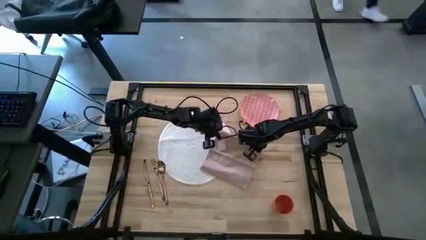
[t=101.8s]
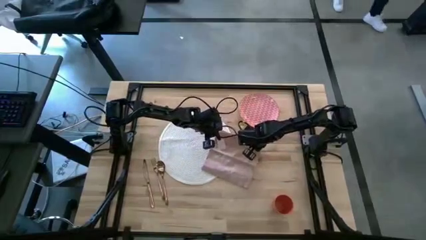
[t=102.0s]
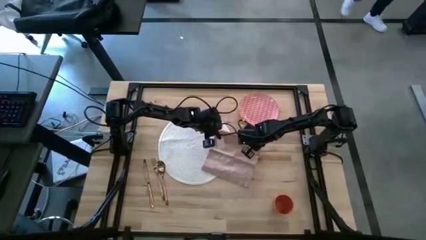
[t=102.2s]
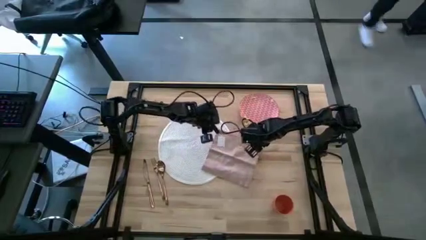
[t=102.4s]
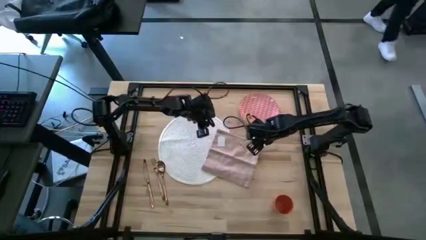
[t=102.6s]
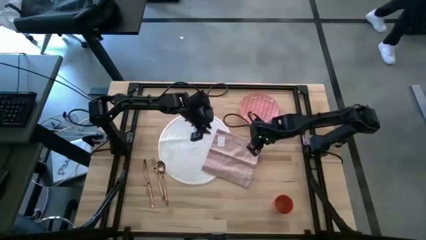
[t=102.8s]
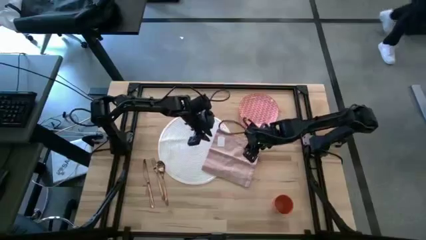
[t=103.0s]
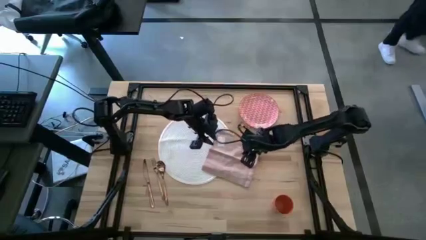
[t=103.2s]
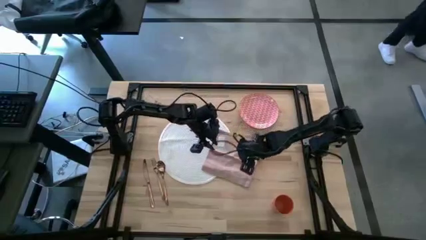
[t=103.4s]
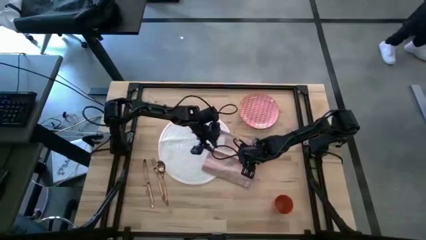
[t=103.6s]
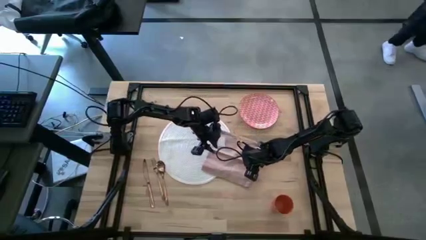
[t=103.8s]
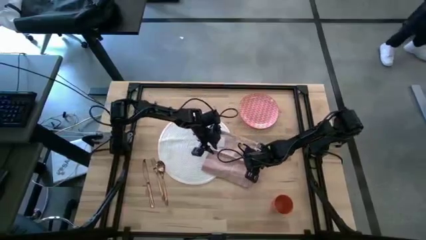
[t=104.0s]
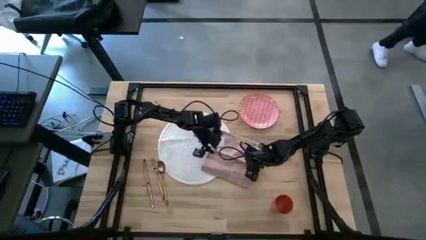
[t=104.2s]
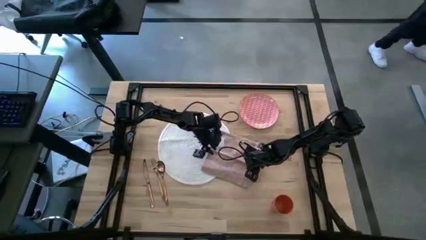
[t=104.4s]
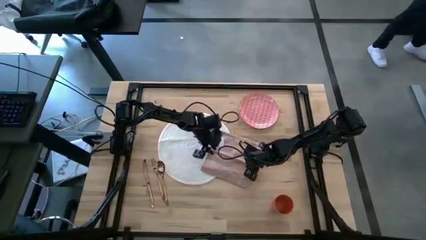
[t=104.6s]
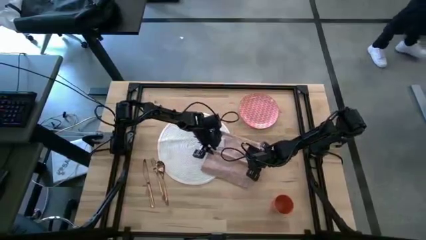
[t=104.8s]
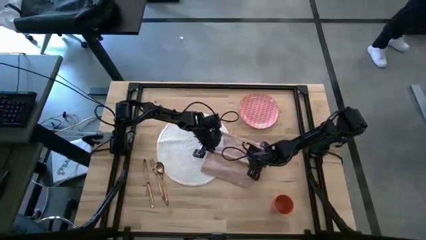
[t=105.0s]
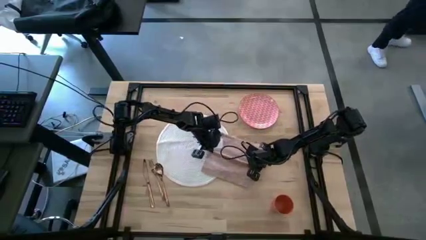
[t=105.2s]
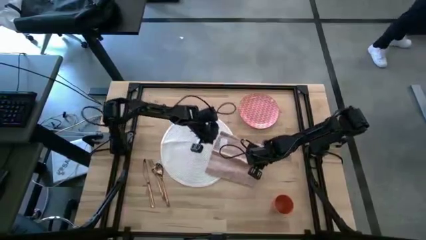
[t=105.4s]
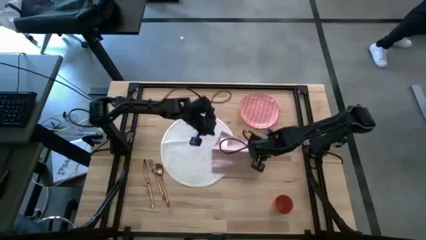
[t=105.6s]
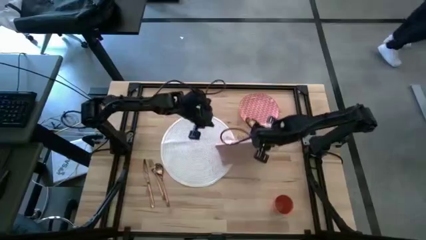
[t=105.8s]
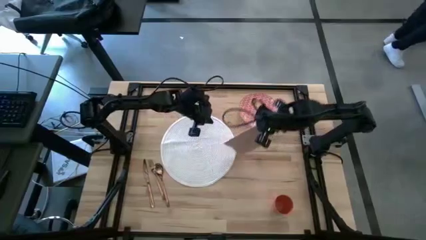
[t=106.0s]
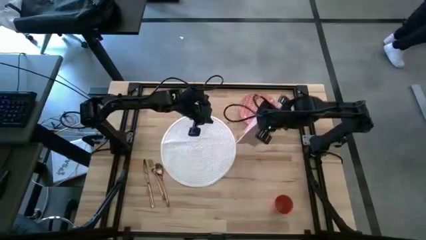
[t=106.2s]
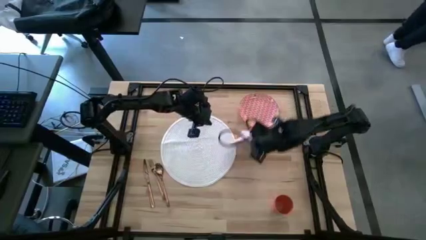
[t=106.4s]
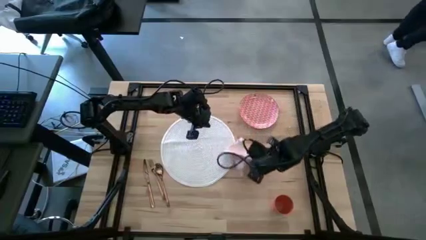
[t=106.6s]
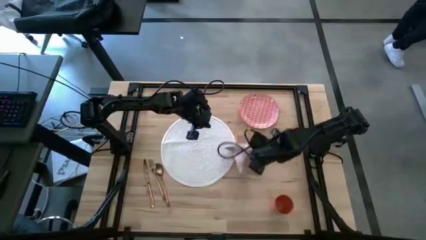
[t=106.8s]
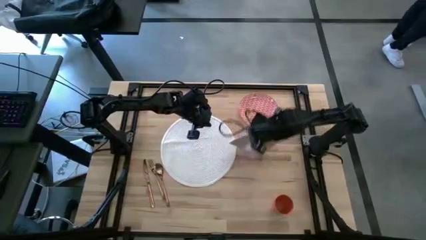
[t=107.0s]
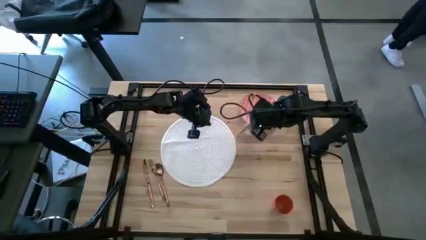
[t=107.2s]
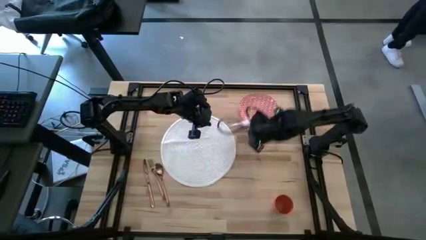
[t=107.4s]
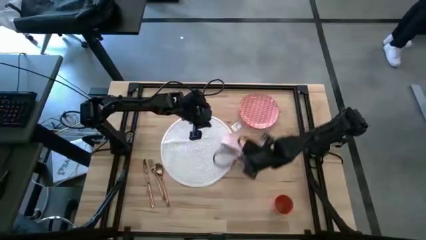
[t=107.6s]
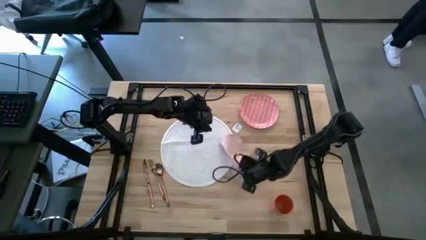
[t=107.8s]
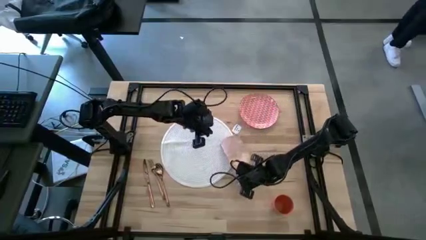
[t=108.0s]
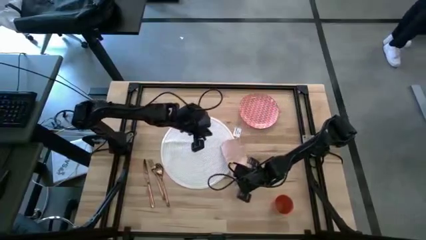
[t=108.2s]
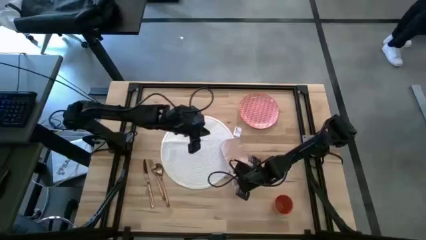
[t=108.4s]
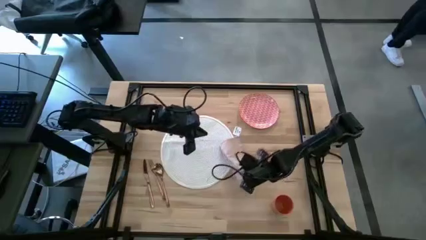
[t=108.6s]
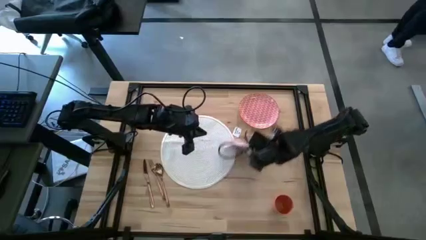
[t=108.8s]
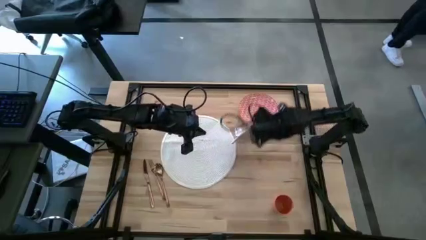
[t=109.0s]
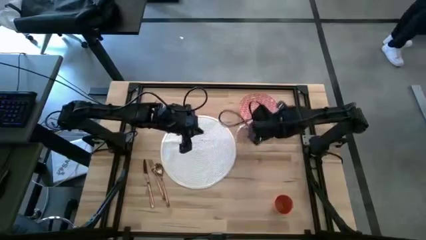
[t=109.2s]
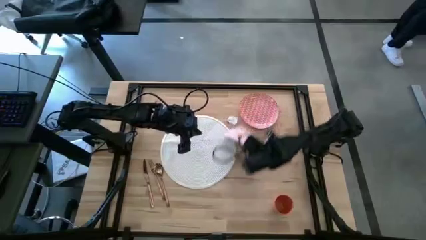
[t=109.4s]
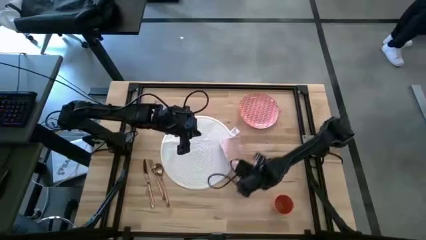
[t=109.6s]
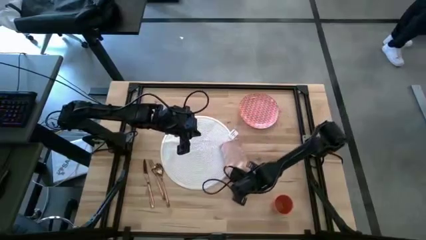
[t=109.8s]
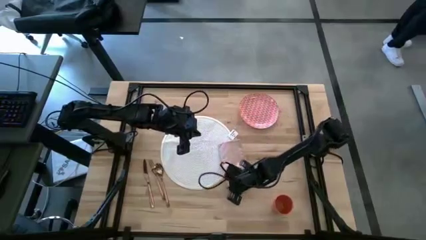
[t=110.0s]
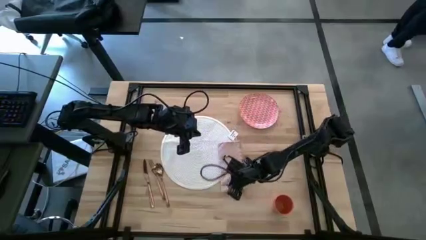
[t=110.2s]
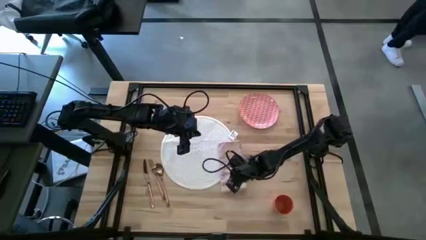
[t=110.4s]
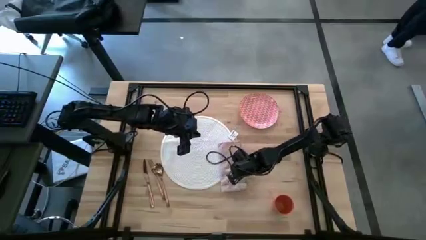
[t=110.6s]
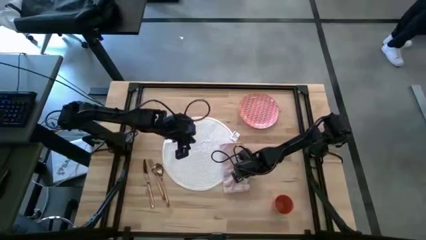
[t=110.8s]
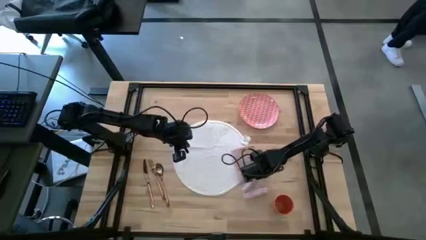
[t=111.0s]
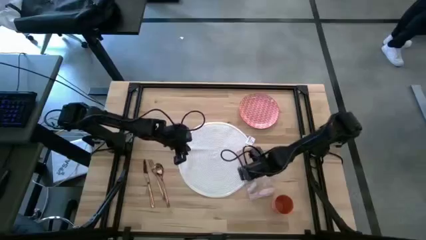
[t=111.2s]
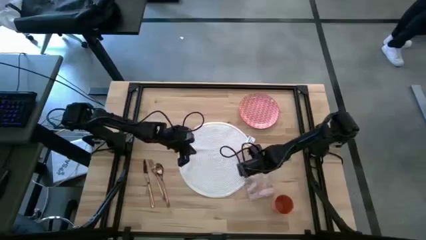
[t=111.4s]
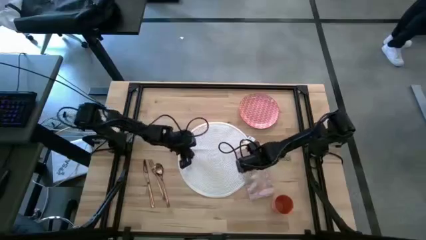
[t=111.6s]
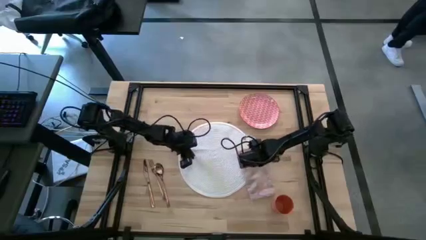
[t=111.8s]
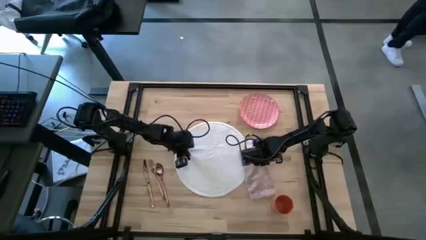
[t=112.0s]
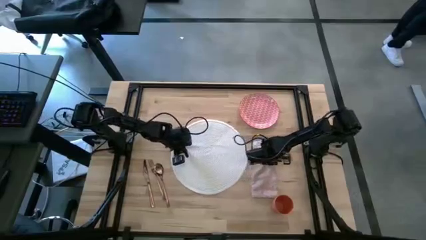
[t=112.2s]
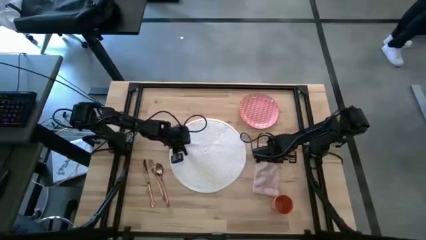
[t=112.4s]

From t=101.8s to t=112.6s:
Task: Set table place
Fold the pink napkin

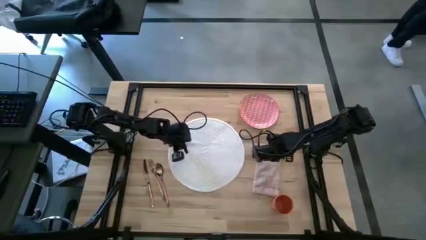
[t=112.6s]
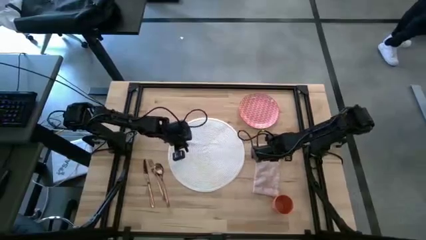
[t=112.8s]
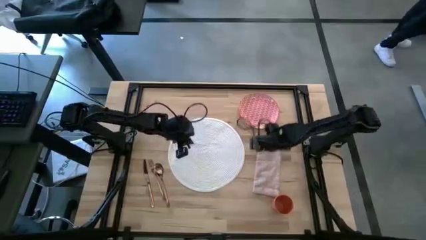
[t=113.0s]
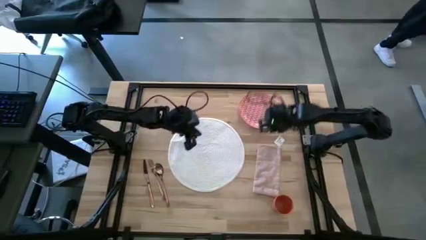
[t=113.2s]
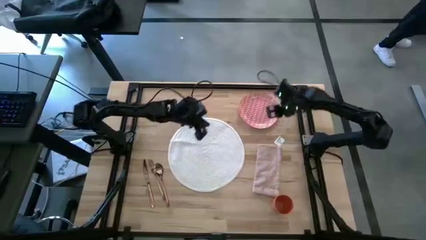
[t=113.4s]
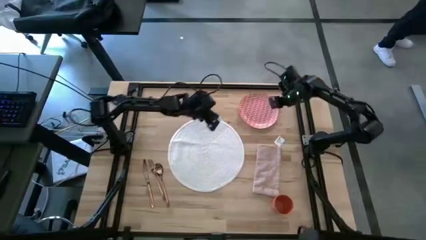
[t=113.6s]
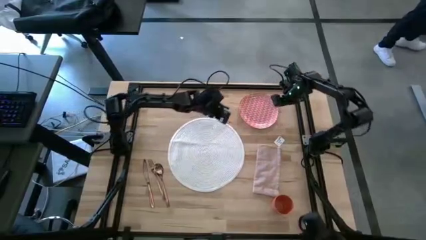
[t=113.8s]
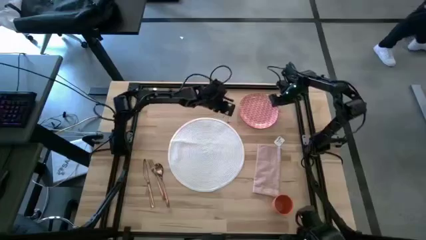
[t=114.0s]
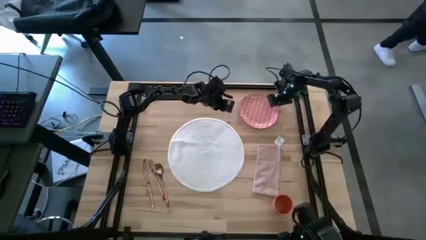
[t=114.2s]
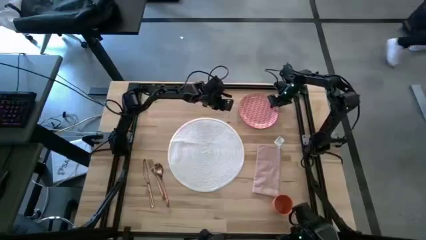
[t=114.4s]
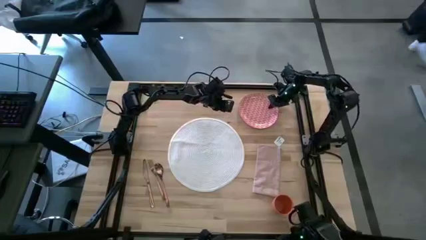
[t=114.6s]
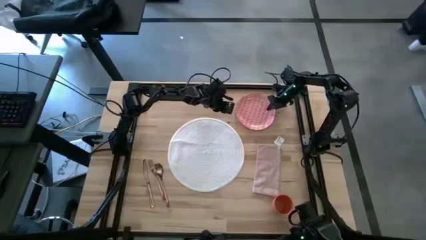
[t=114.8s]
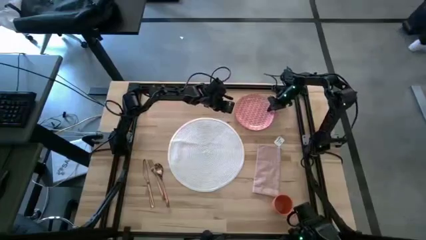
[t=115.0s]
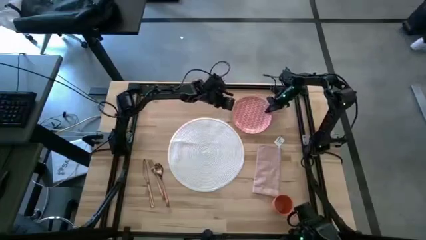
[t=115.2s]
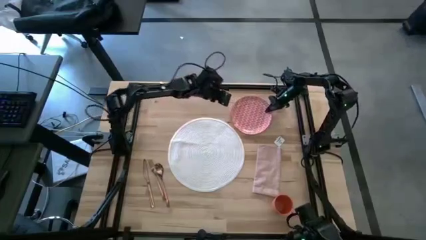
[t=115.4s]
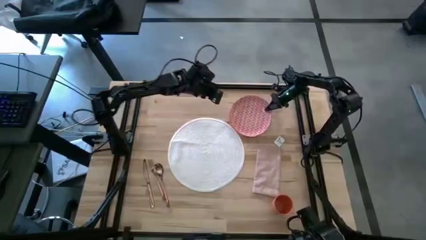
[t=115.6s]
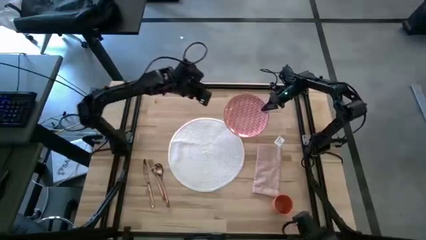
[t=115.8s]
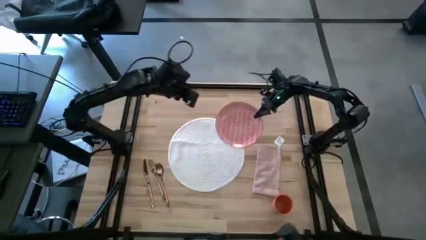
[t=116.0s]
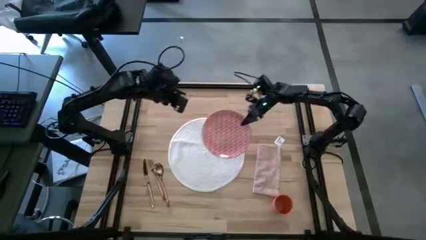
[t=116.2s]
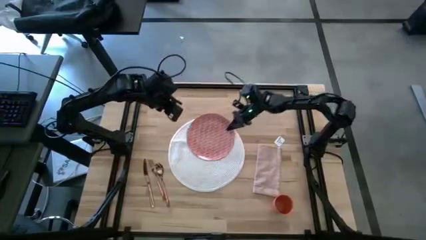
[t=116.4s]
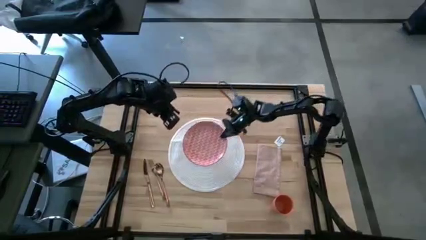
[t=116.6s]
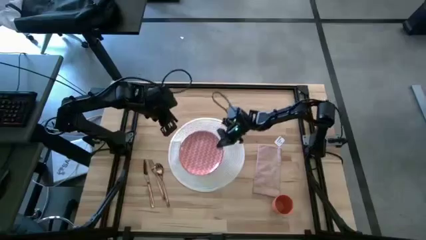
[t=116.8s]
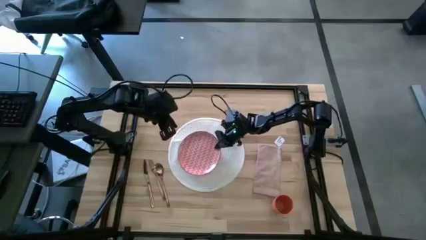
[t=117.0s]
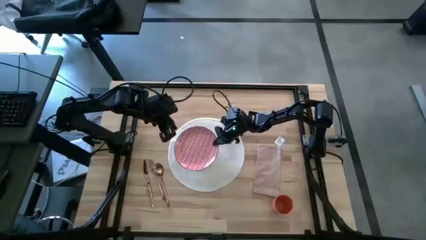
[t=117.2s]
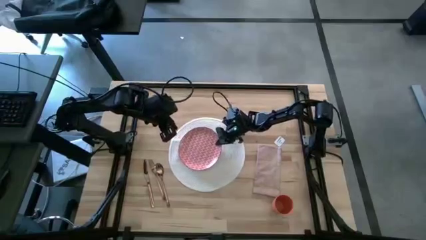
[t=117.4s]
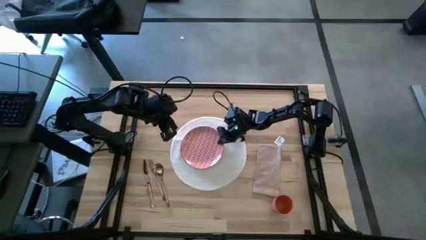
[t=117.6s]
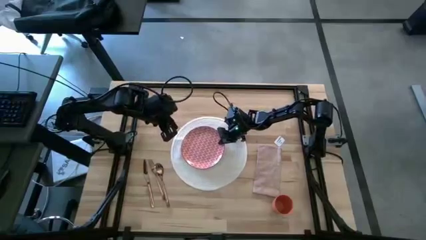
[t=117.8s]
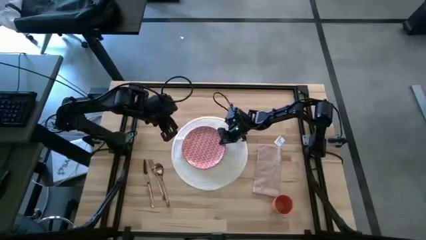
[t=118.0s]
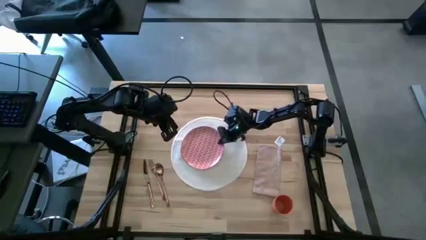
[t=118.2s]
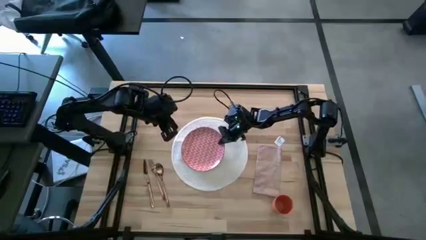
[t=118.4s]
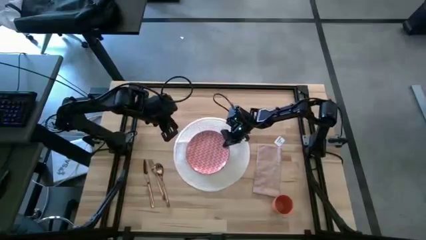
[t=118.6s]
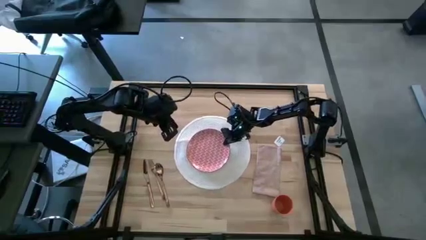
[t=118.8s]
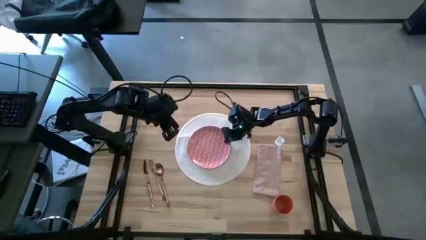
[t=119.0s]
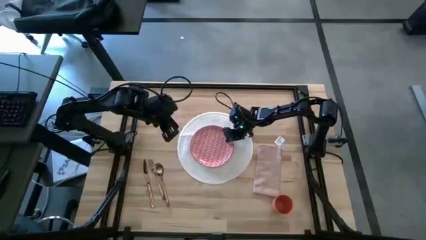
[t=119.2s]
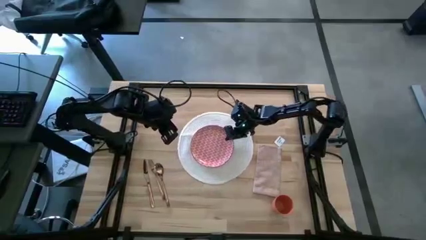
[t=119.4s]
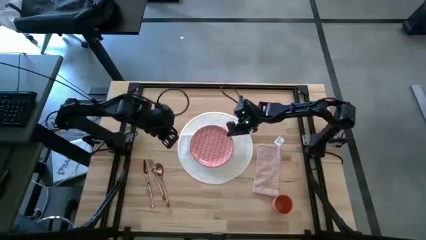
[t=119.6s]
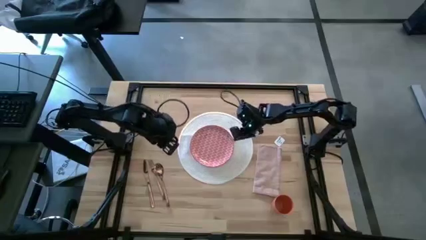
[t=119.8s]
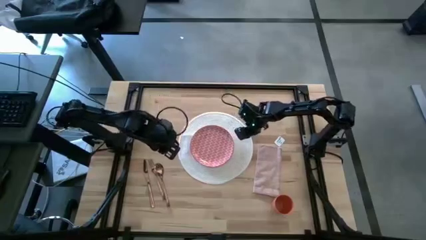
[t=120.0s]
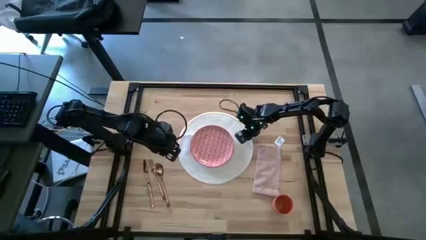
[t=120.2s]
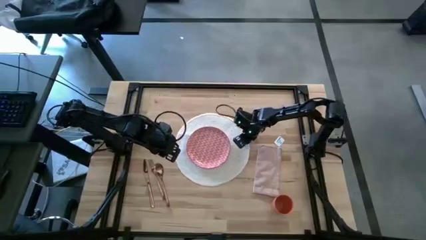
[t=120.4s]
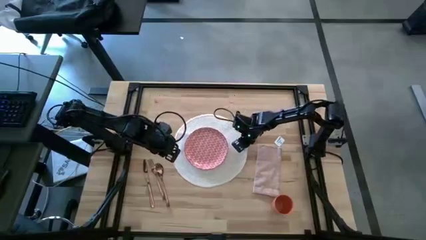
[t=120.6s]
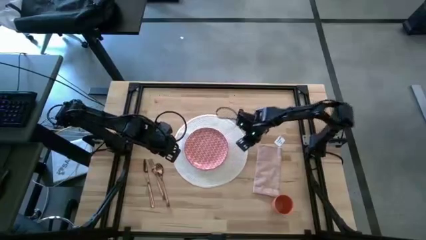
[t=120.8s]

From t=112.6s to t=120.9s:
Put the red patterned plate on the white placemat
